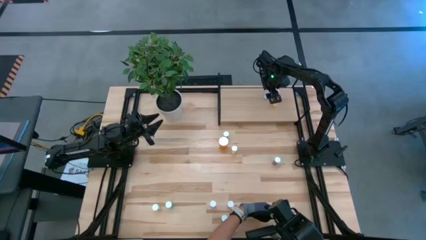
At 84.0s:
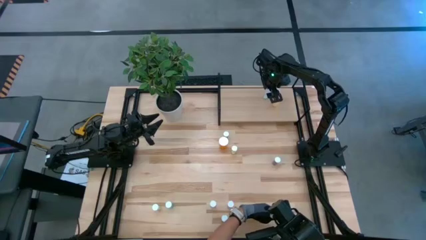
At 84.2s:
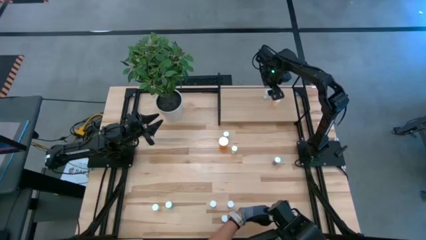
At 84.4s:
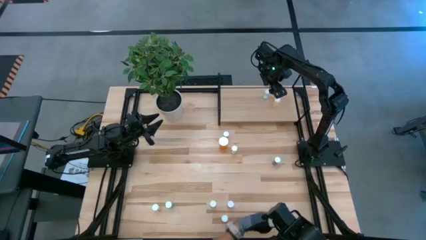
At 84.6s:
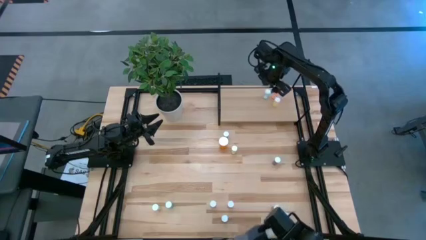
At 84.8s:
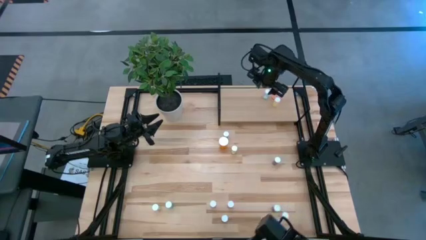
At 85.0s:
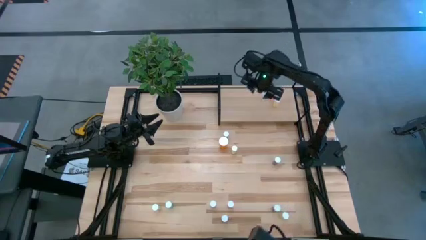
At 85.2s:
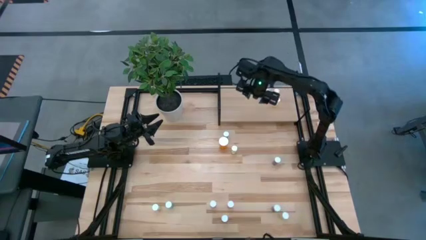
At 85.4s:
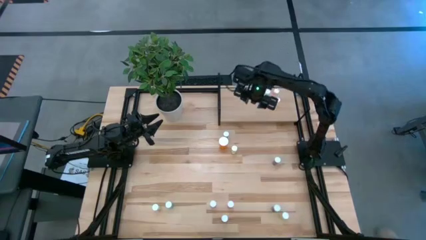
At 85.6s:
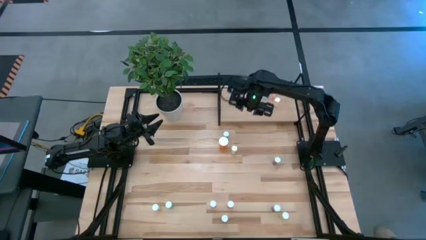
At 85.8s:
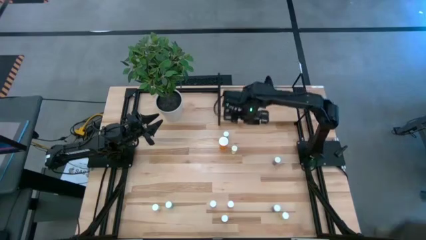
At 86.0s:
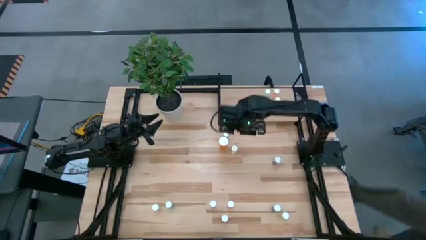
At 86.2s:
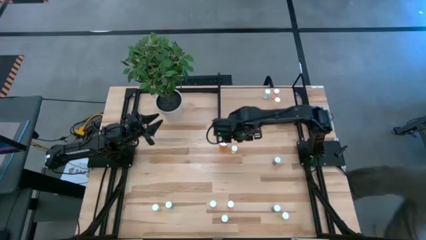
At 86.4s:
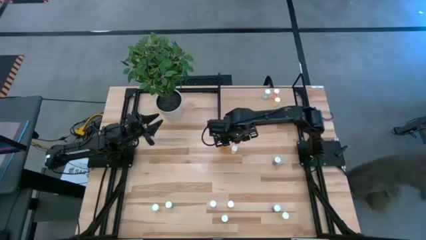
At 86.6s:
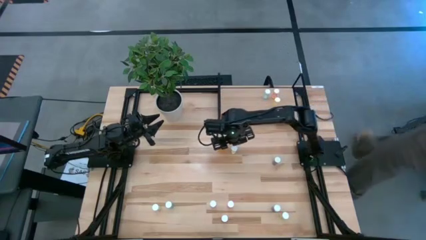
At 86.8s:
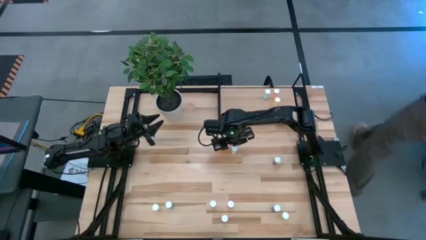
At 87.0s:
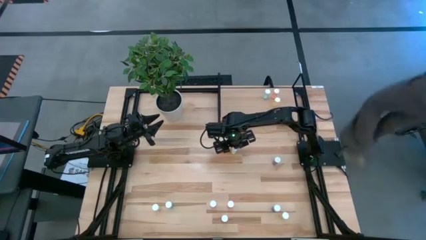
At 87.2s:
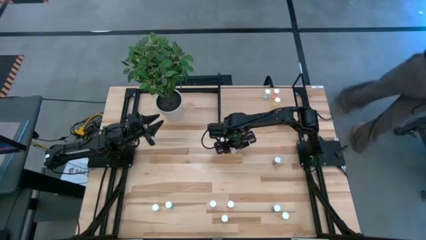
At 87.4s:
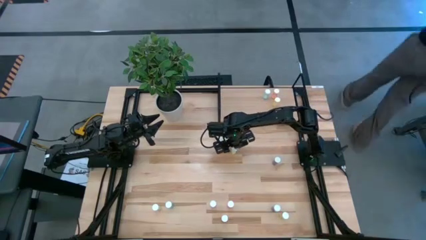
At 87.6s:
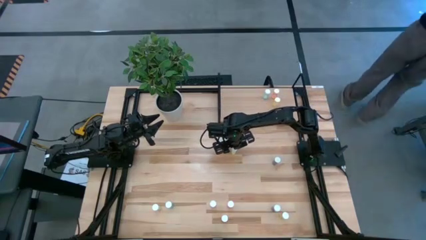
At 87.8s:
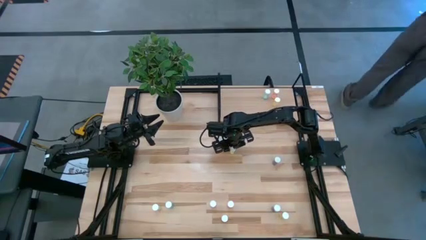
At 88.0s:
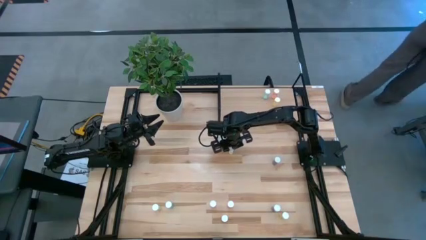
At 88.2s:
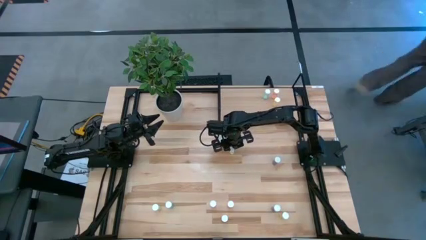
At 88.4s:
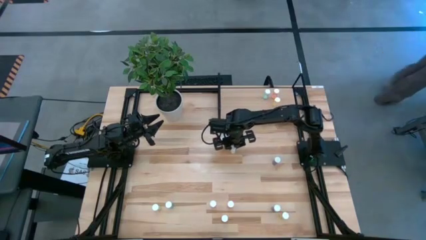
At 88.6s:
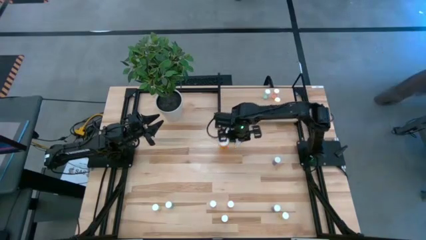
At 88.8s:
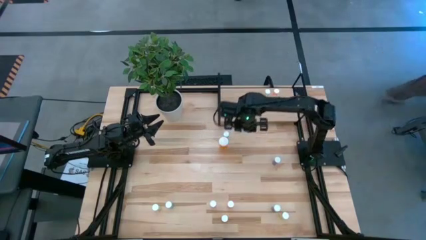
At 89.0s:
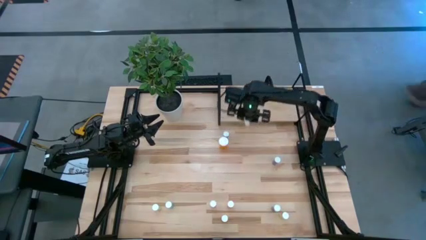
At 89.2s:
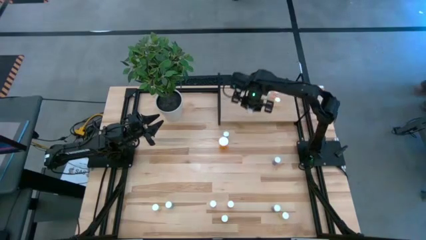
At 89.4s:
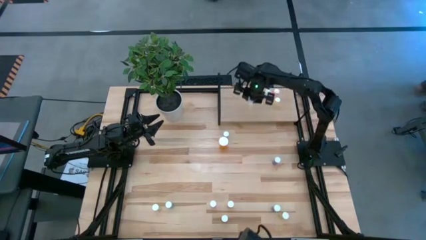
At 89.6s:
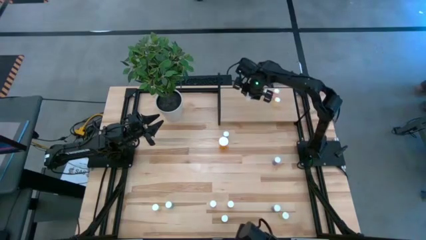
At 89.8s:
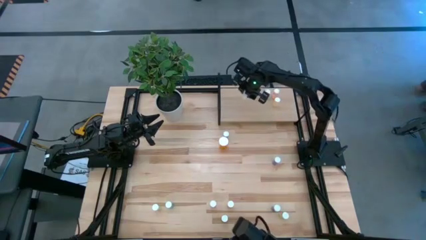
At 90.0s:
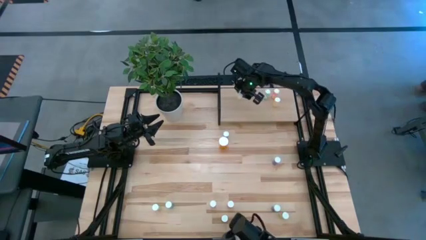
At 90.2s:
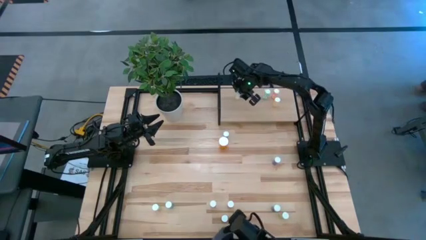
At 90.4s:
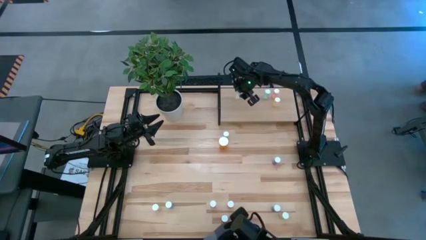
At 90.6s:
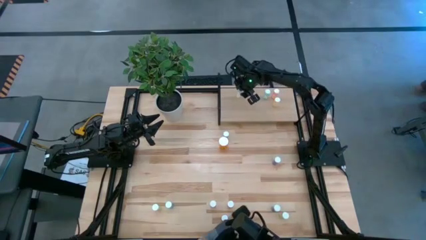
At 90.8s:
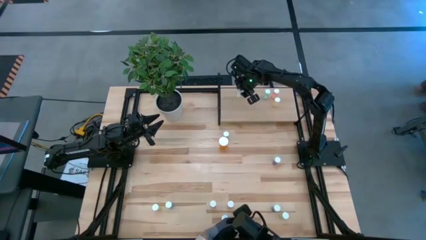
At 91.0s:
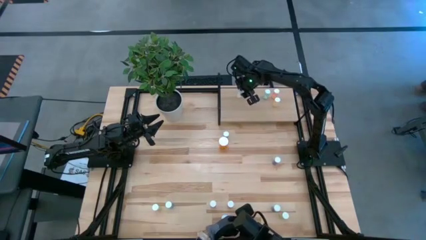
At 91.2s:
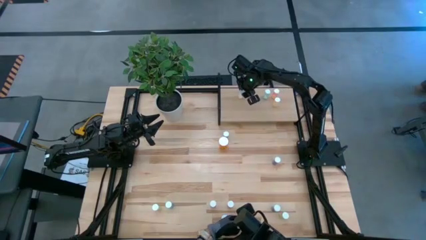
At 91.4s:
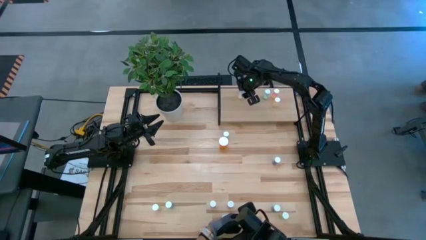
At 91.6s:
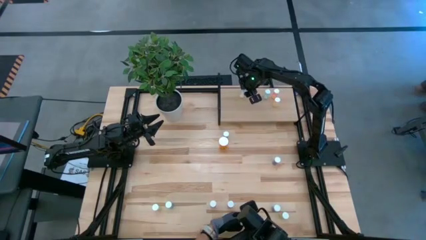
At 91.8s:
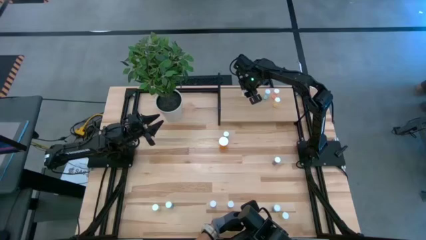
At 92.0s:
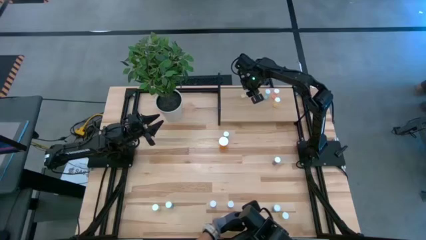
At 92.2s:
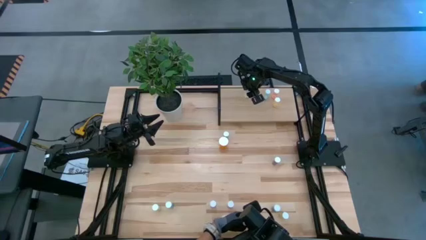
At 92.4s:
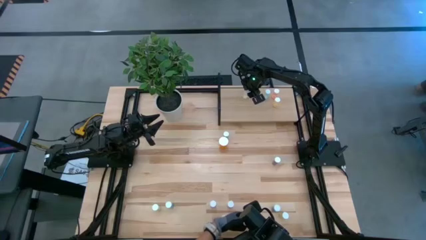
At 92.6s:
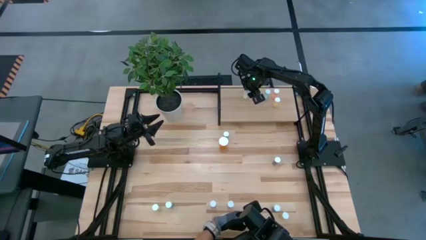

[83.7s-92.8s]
Task: Pick and place medicine bottles onto shelf by color
Put the yellow pill bottle on the shelf

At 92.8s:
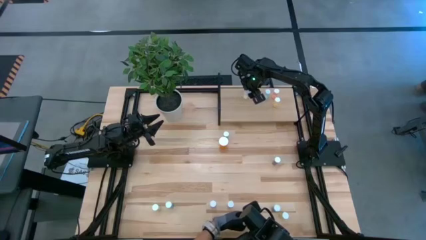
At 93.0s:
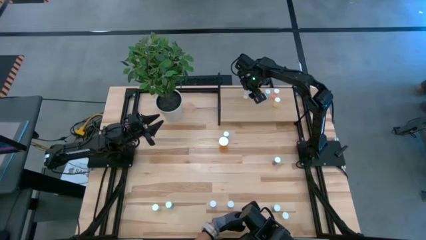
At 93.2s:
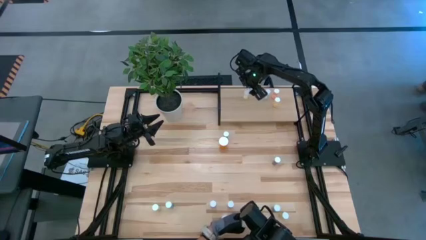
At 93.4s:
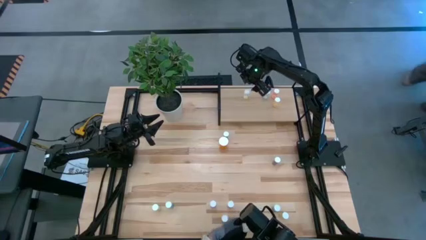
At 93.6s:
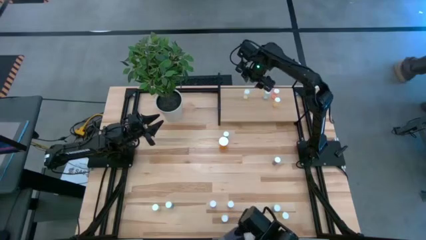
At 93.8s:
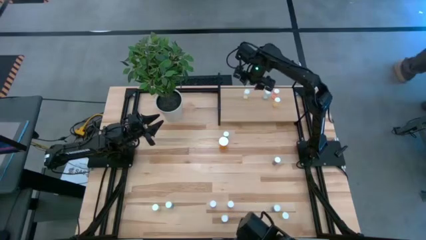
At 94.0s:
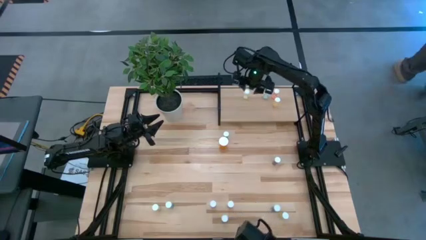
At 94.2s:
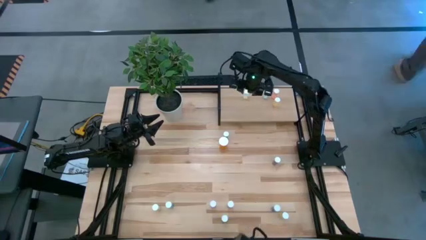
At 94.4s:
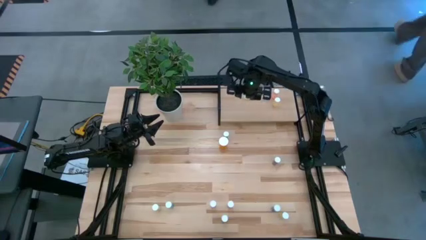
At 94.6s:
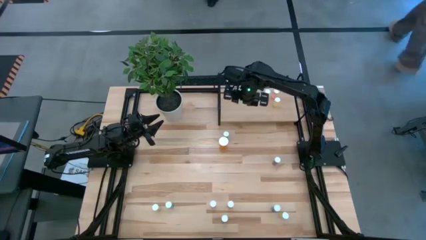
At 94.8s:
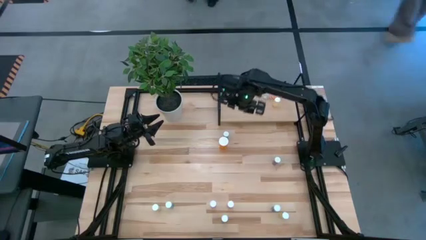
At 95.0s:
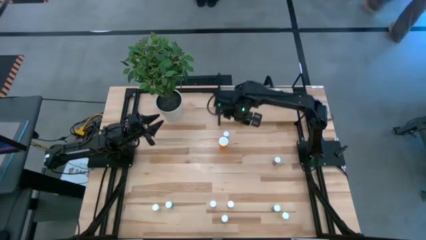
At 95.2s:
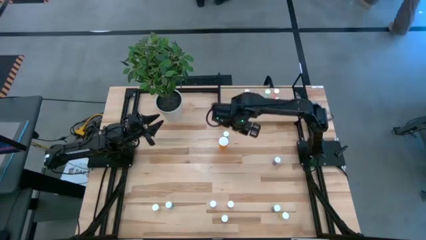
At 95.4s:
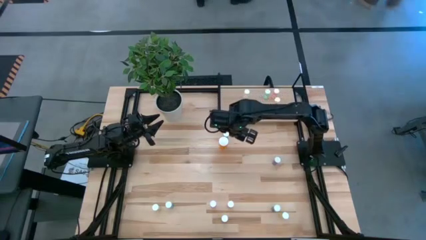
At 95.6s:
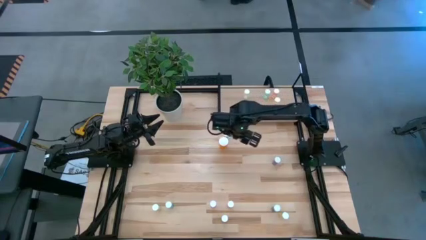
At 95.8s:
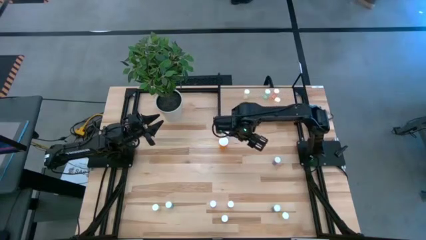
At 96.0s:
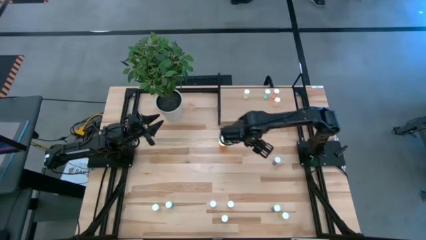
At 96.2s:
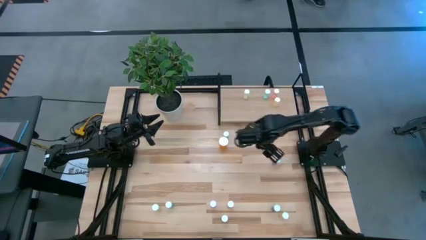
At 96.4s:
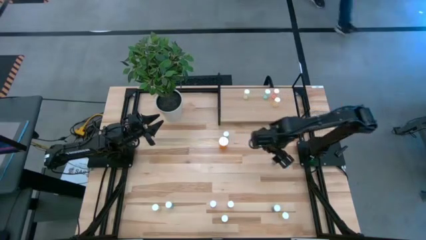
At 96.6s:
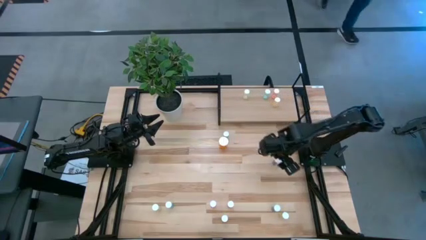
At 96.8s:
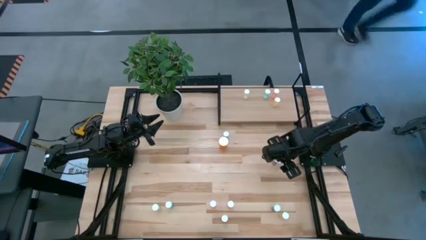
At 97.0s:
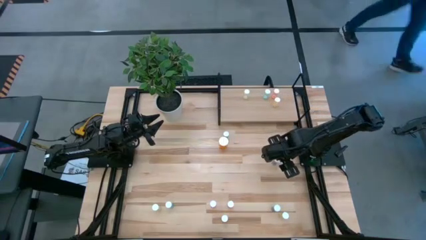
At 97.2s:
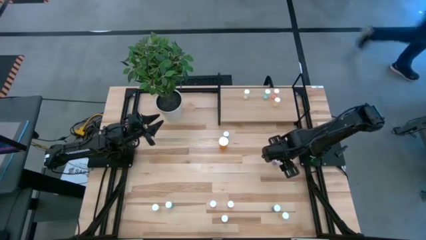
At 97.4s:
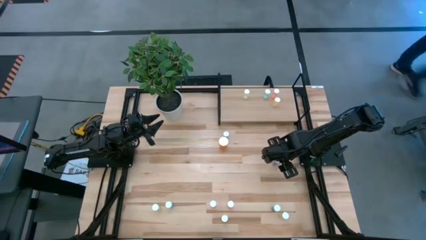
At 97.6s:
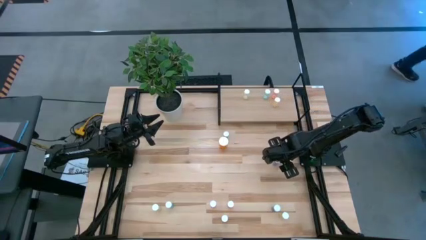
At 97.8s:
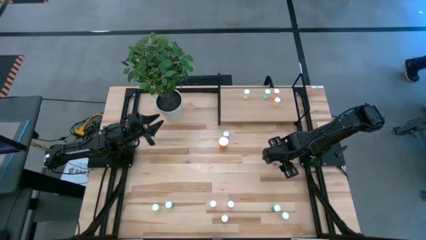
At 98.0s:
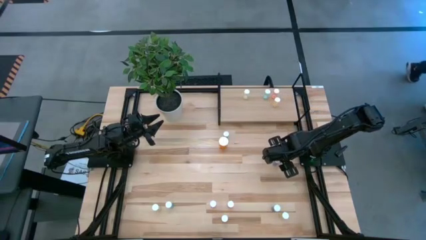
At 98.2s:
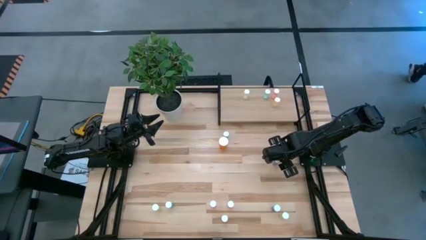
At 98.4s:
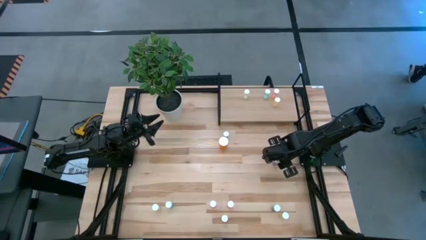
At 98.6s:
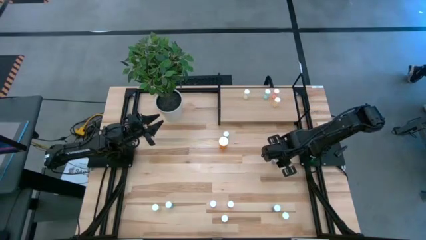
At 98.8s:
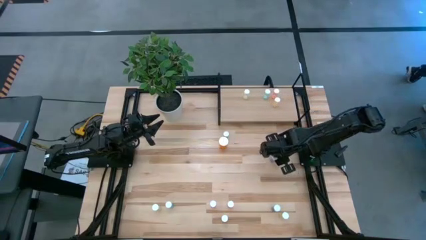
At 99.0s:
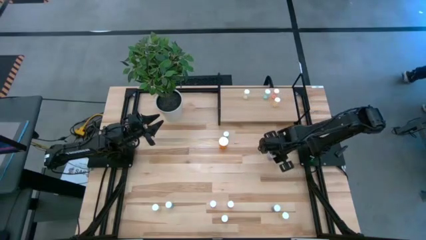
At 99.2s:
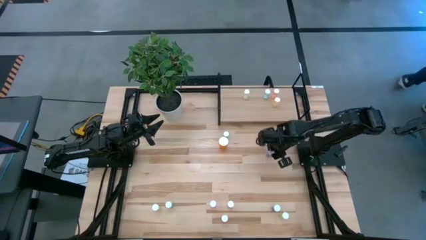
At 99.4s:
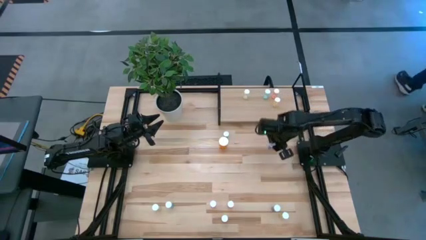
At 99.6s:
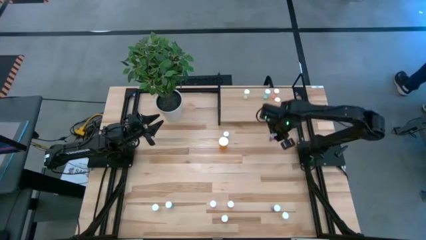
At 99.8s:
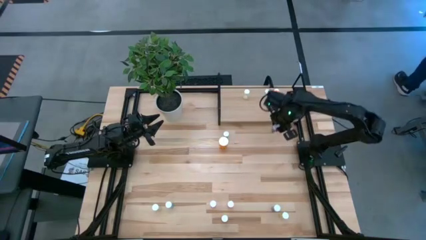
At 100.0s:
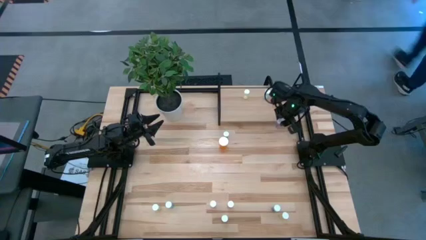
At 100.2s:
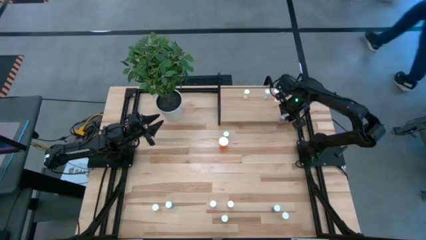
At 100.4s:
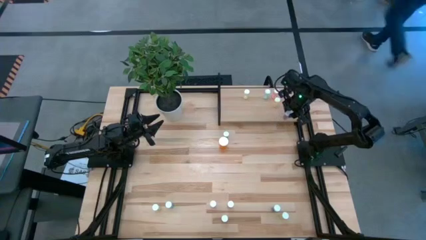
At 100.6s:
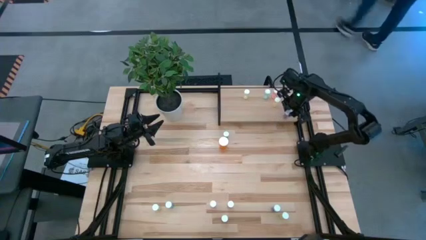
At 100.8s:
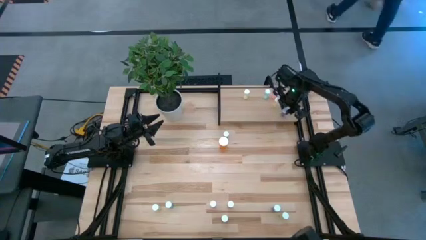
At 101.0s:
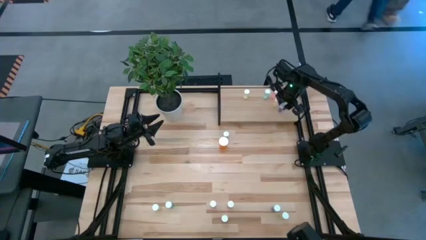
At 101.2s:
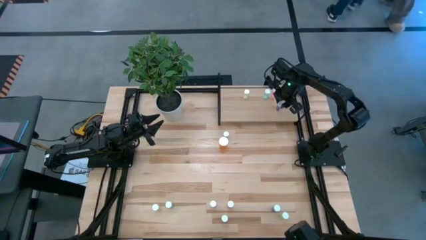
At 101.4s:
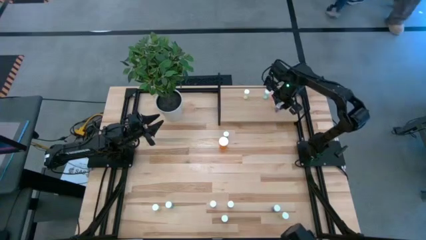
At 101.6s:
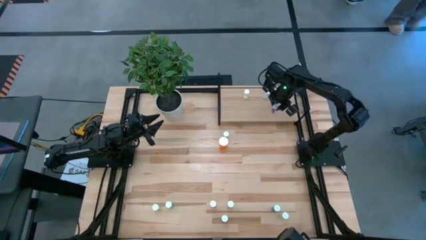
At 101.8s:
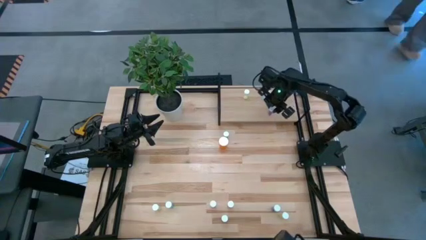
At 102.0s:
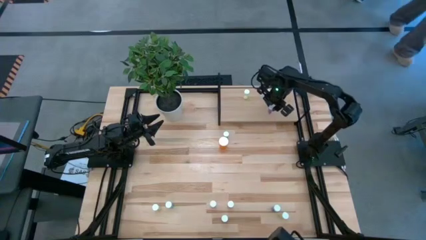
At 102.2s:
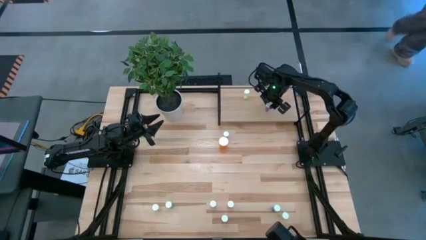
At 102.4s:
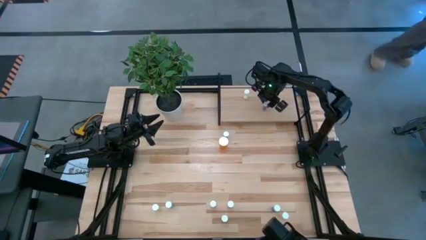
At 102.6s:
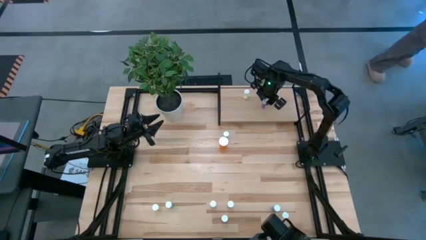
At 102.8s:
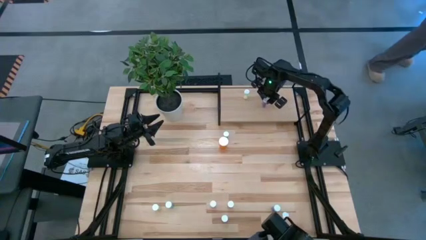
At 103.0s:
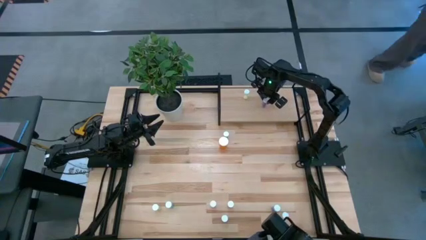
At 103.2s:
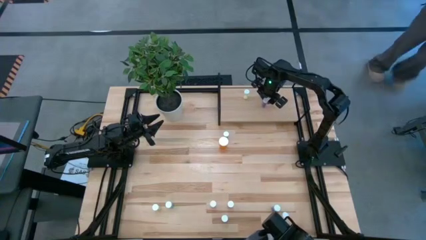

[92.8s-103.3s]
Put the blue bill bottle on the shelf
